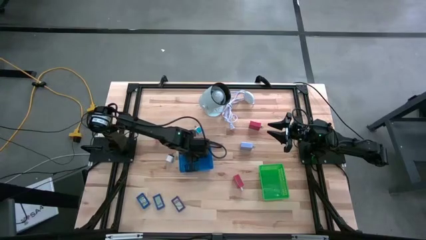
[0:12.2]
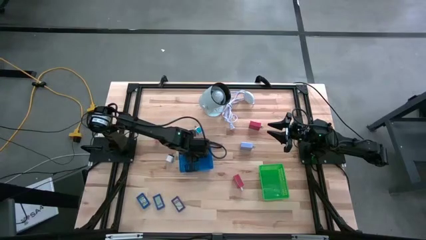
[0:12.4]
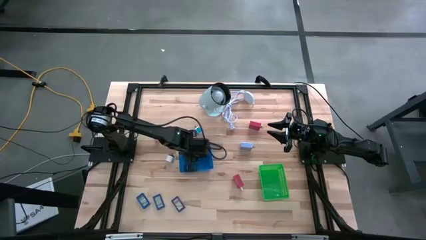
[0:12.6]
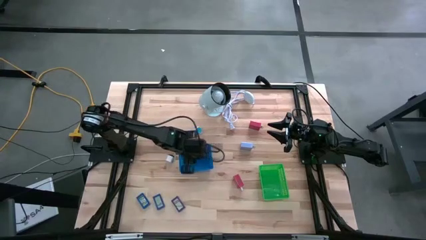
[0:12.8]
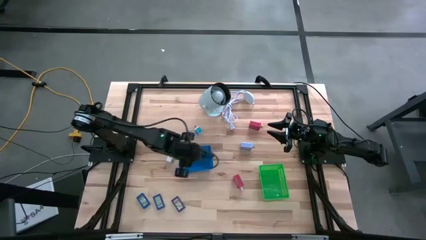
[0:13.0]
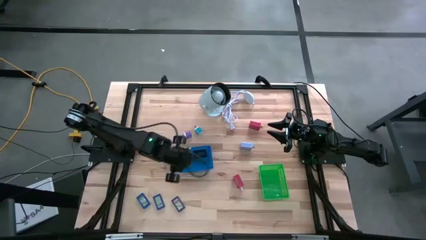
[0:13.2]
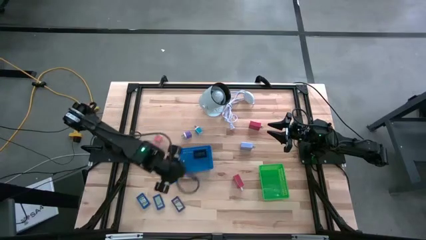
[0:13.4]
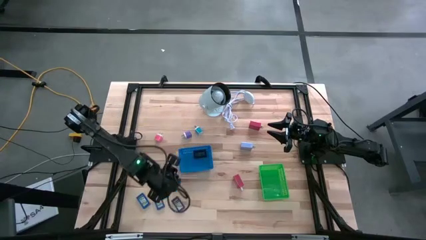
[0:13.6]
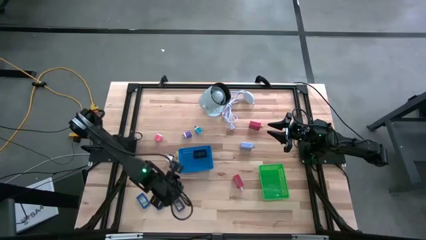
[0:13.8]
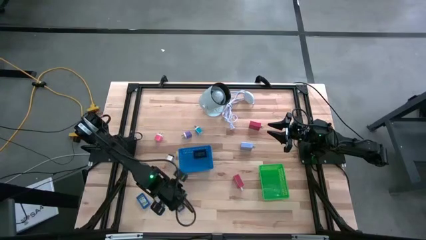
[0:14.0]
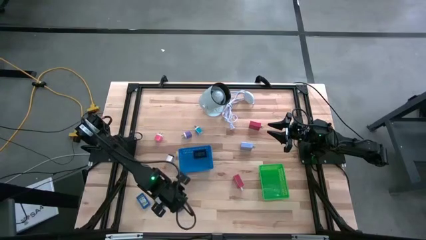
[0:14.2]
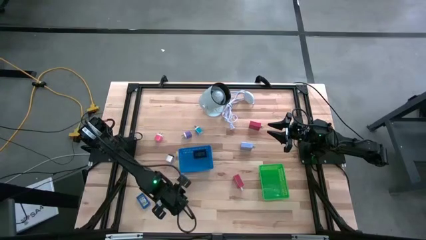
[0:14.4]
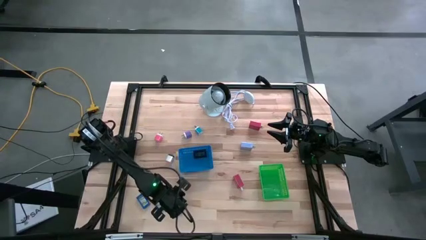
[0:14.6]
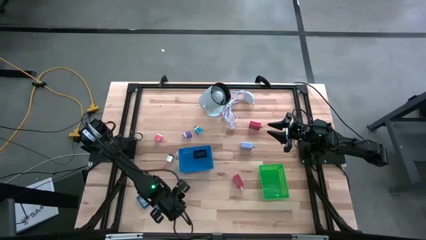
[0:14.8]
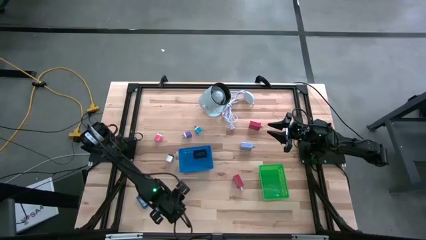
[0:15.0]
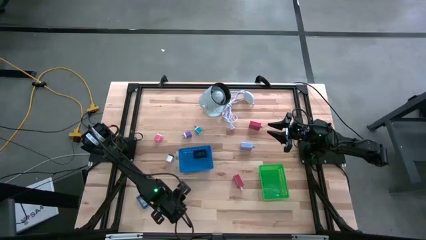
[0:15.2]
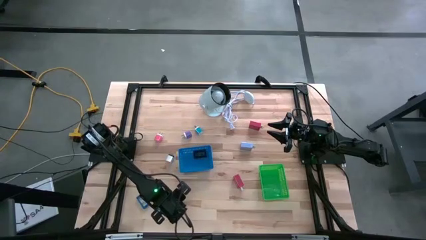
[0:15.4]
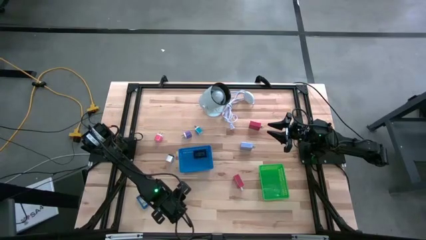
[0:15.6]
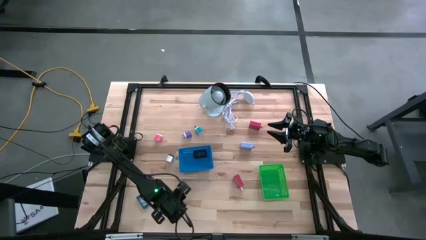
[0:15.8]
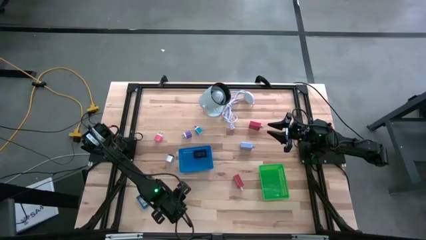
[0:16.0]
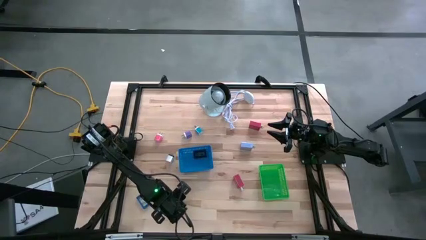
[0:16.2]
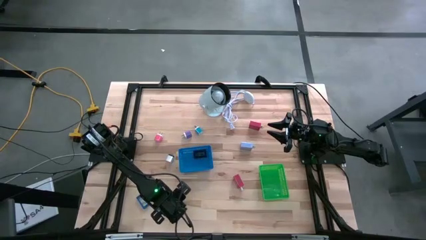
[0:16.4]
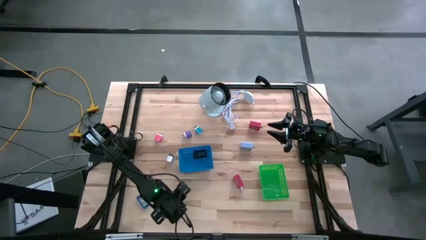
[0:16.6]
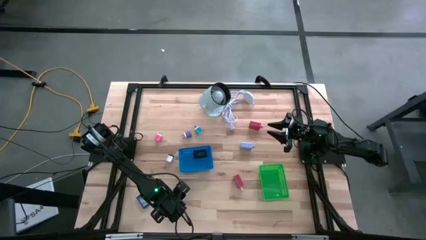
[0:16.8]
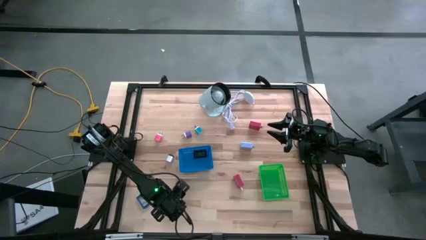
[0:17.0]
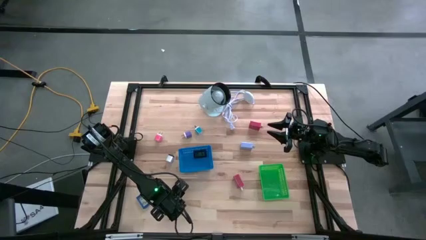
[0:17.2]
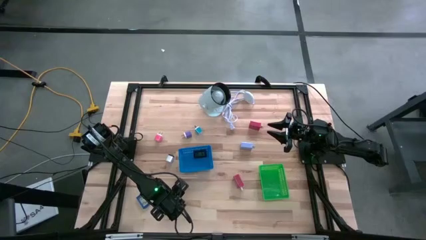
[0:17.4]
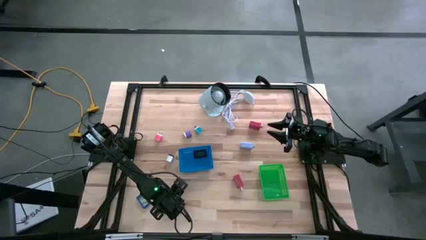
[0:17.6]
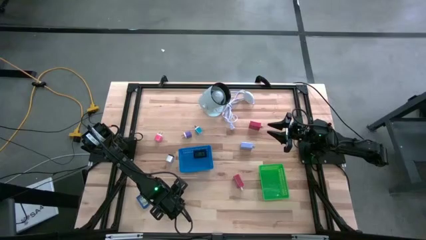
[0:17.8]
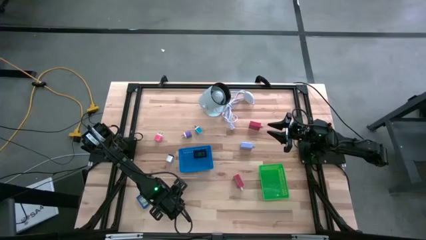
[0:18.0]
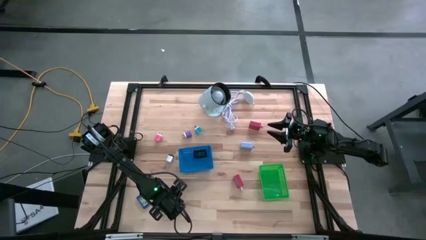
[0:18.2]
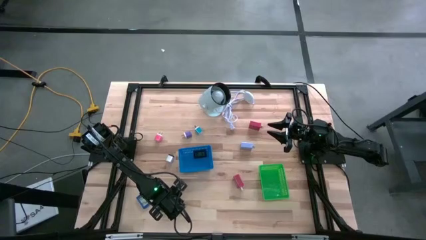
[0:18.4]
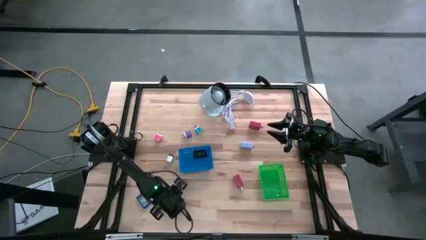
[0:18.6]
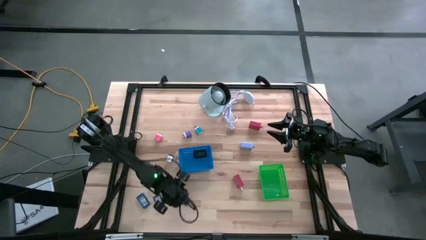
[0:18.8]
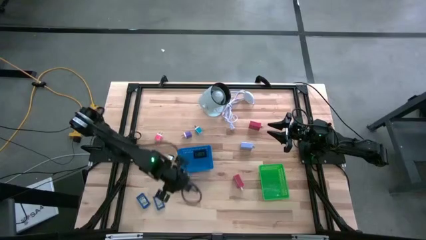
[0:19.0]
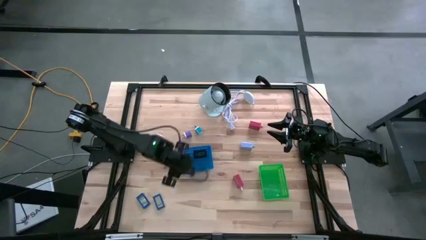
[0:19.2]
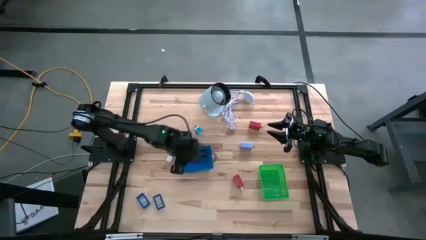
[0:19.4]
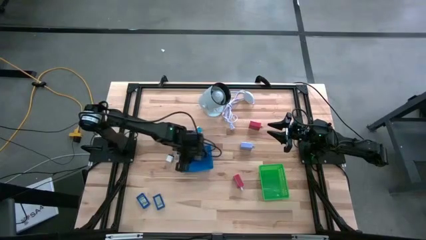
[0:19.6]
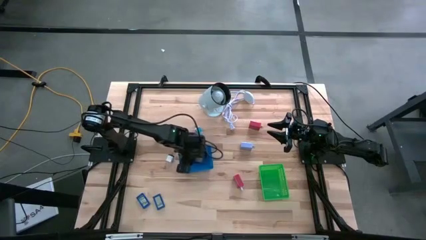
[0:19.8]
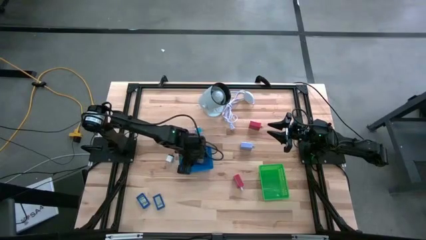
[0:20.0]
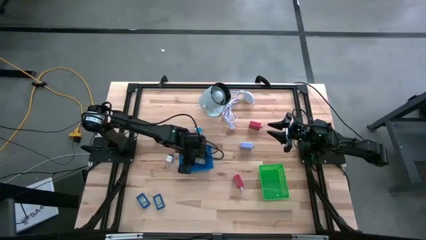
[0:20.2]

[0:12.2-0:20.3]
Task: Pick & Place Office items
Put the violet digital clock into the blue bin

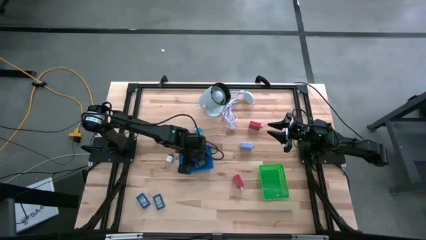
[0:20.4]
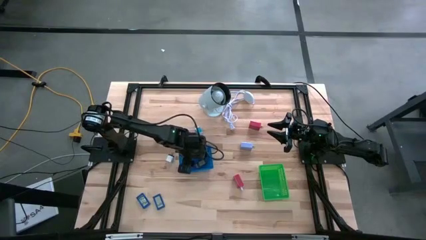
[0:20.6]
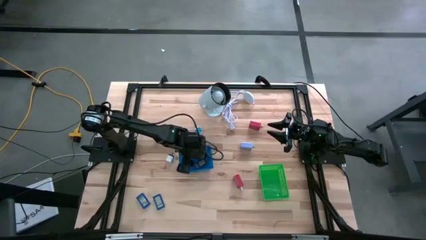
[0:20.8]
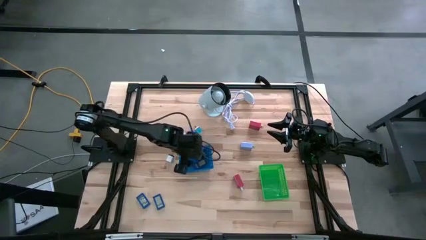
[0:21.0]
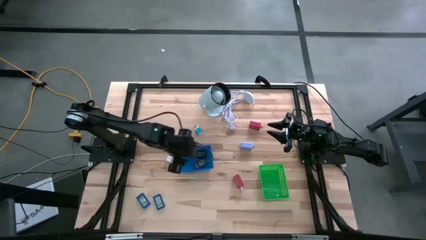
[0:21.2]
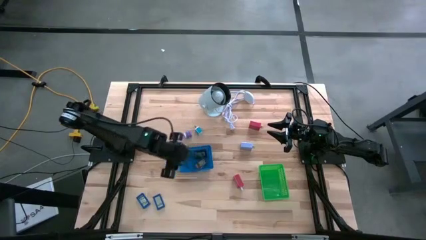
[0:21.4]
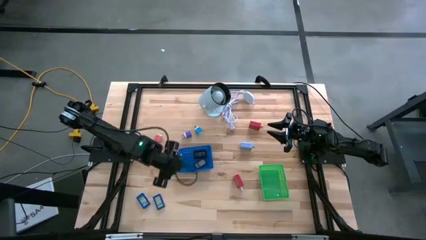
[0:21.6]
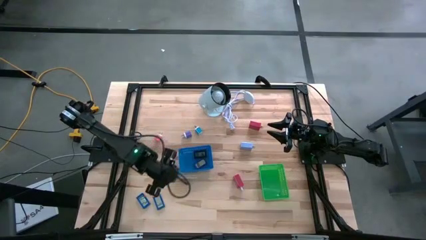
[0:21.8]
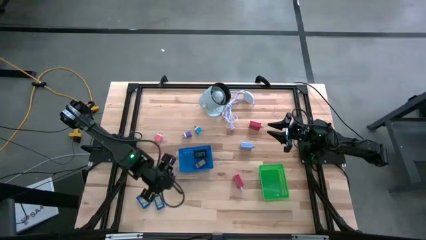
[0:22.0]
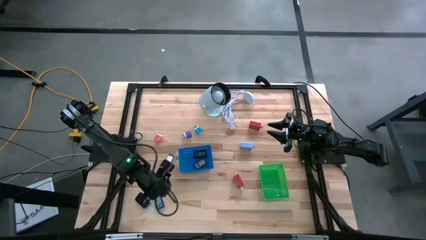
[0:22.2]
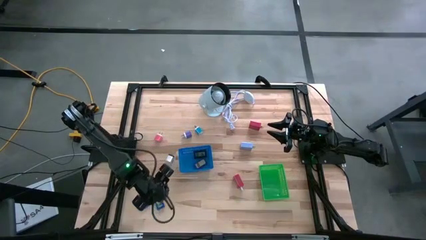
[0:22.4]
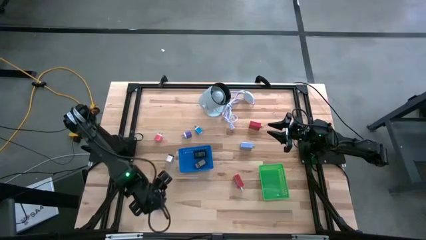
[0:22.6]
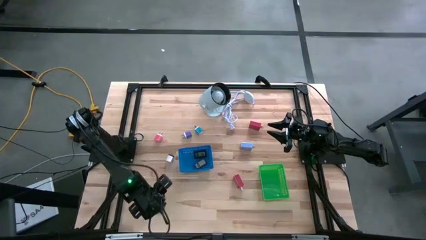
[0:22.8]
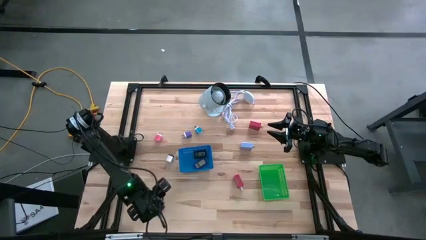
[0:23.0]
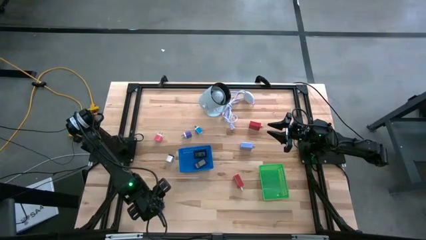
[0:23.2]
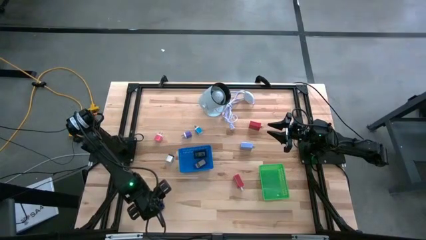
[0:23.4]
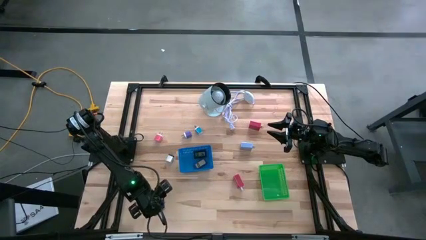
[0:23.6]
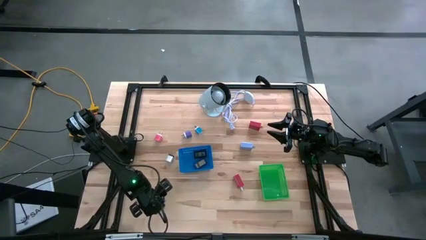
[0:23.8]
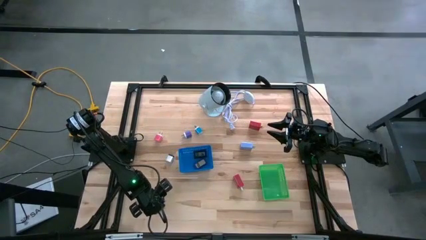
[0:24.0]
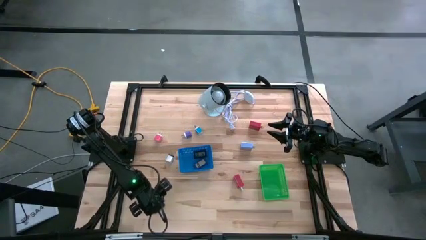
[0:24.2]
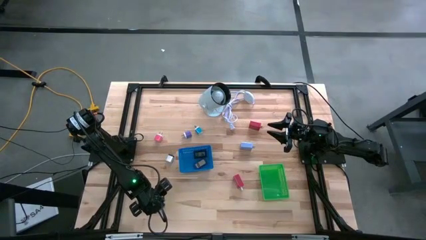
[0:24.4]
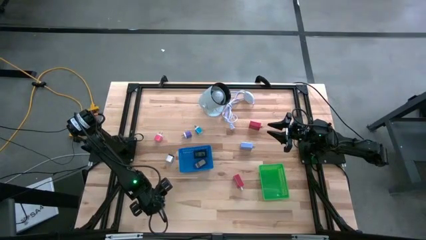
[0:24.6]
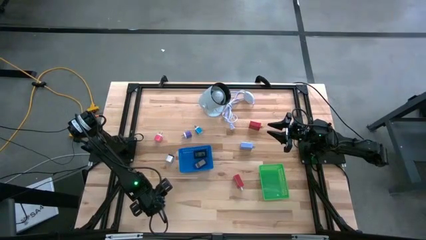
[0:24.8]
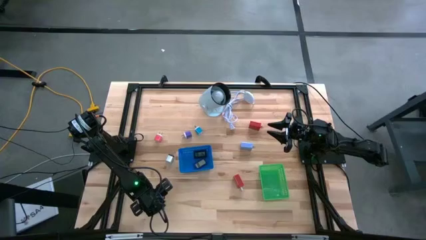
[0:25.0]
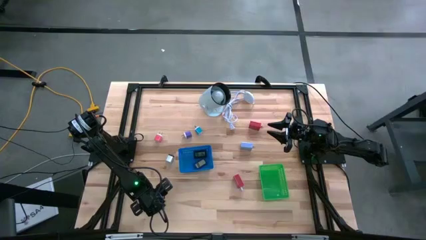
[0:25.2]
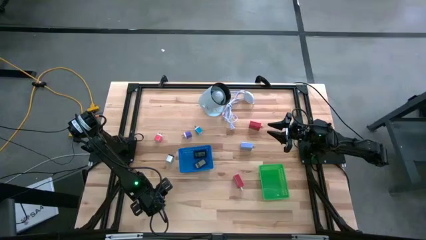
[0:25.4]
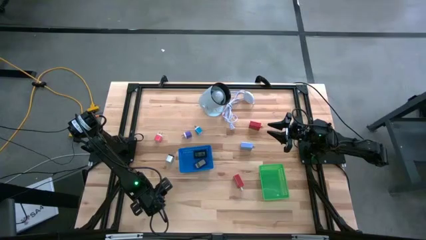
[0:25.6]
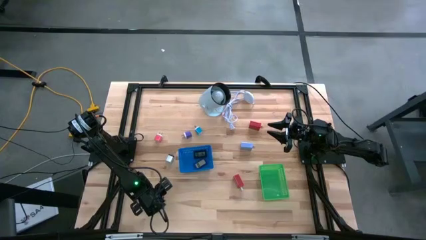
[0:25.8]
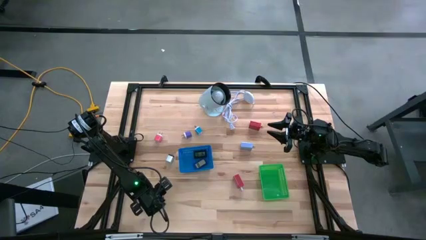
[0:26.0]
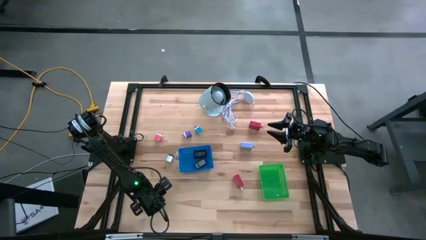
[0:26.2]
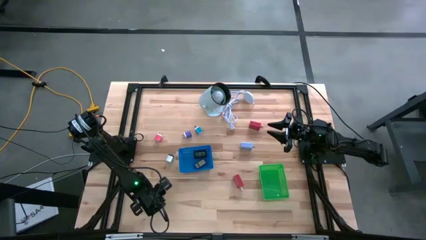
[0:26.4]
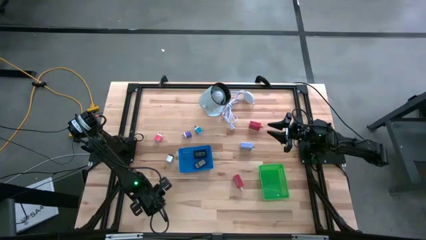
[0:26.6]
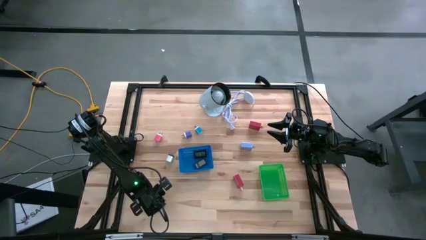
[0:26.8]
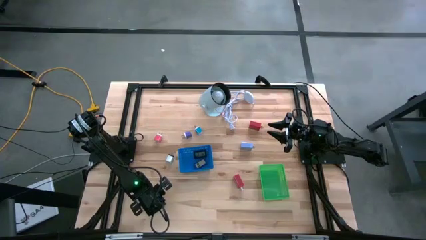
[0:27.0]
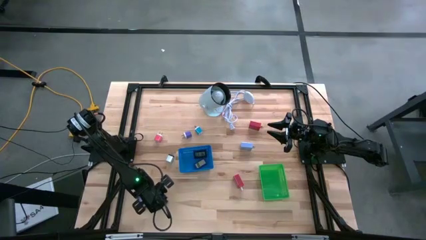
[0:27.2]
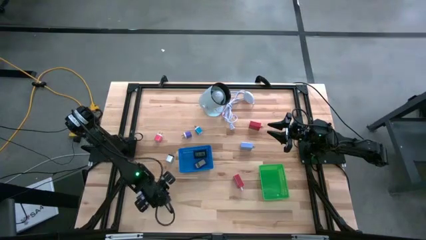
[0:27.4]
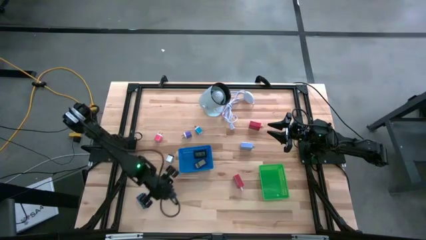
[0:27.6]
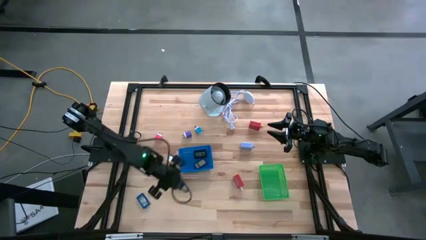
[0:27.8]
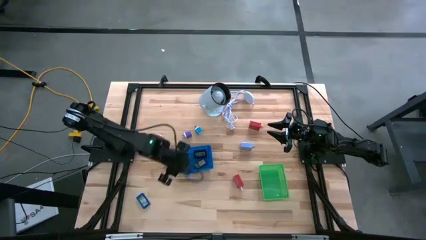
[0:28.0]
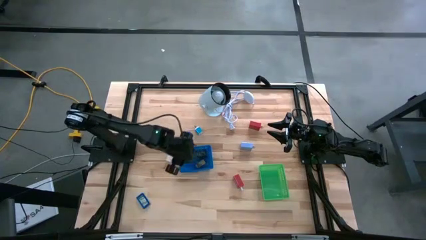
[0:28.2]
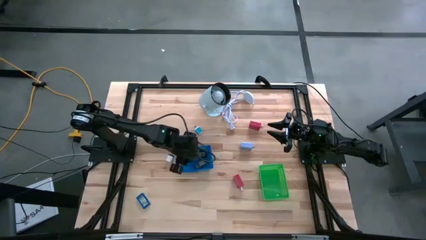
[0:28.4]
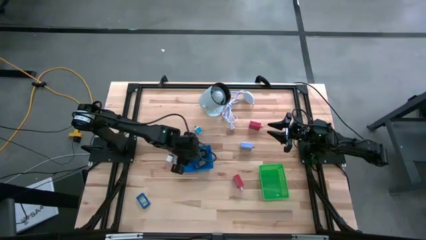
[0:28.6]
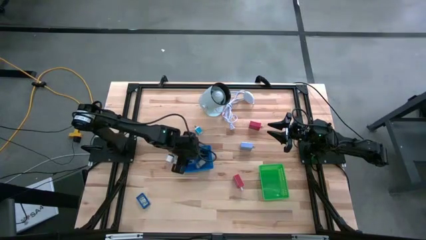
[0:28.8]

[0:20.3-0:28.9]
Put the right blue digital clock into the blue bin
